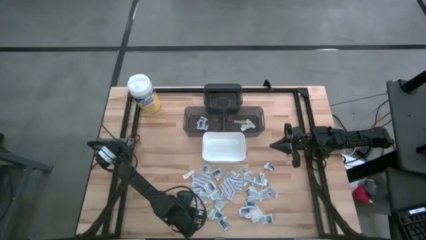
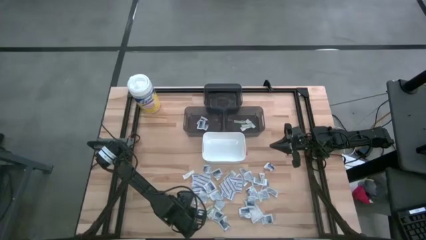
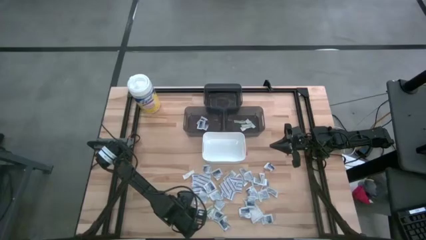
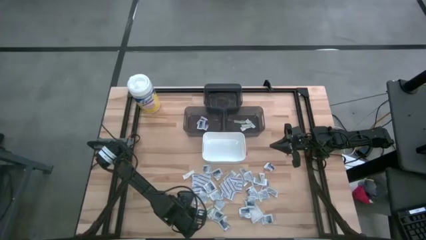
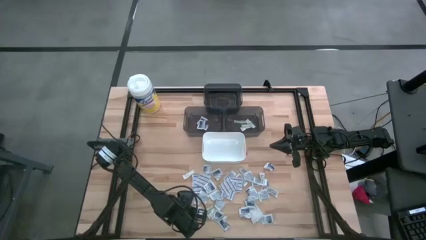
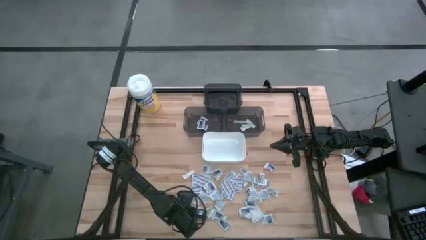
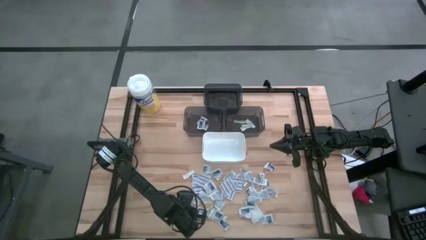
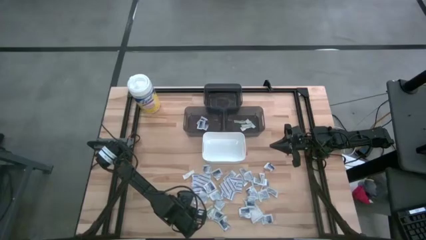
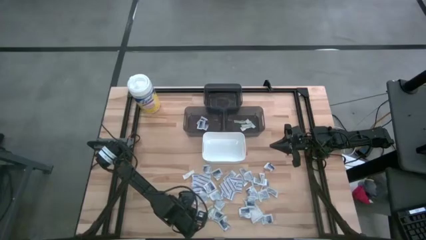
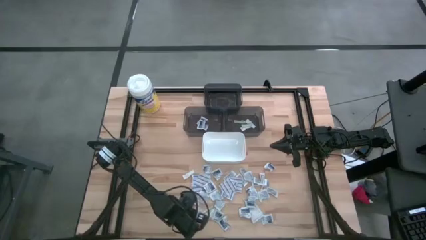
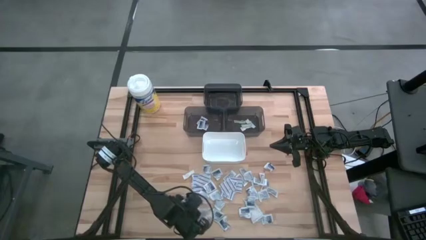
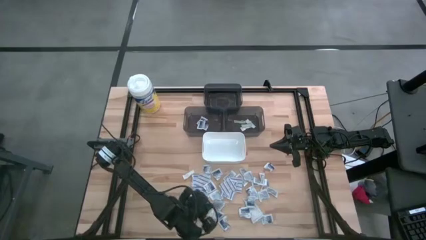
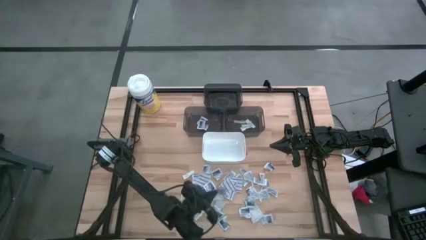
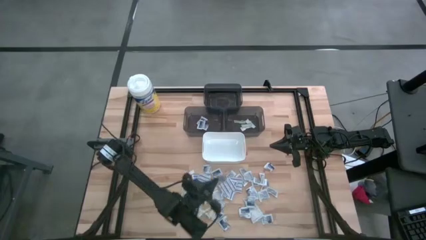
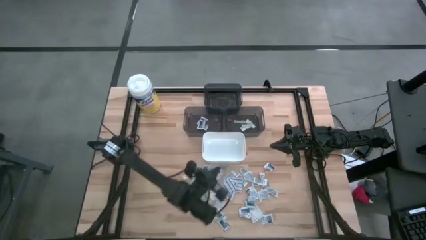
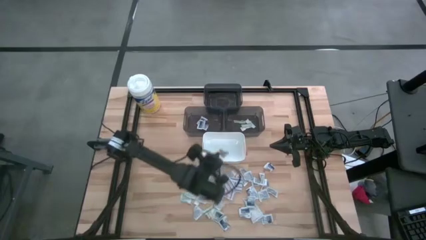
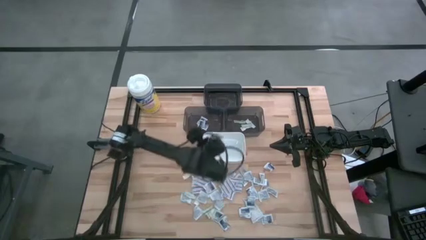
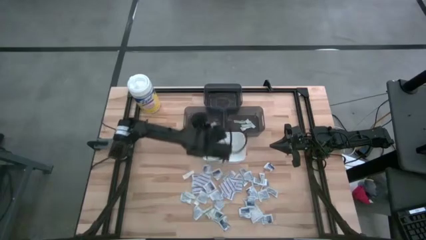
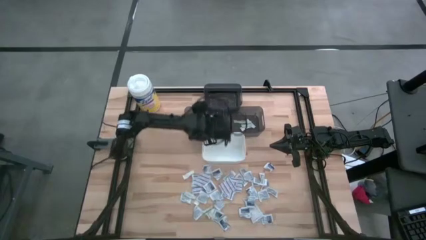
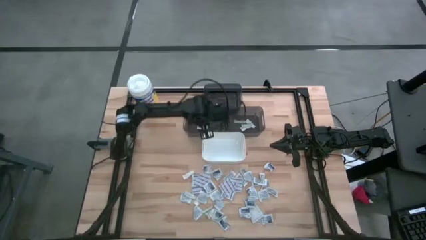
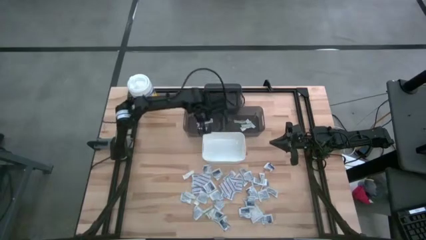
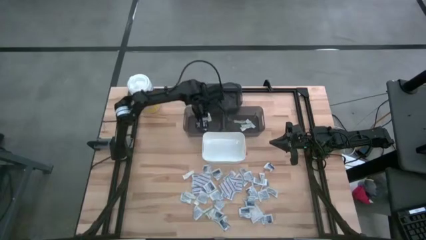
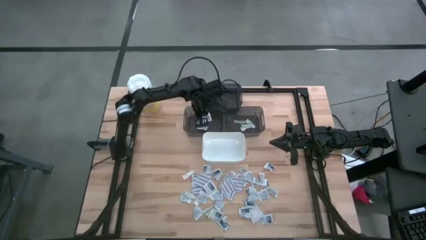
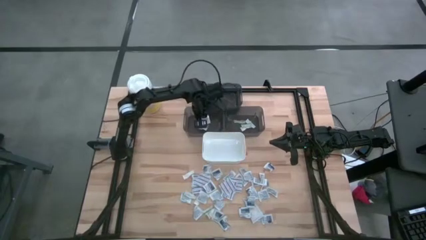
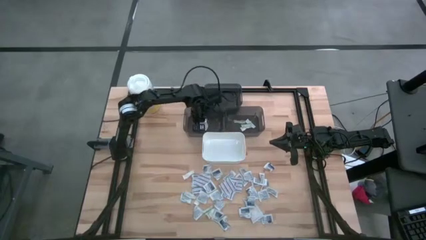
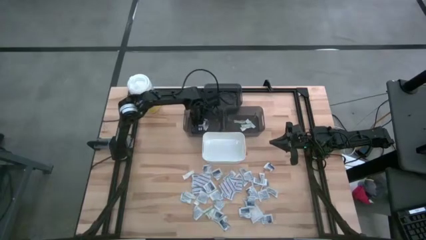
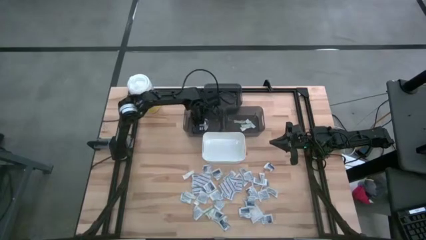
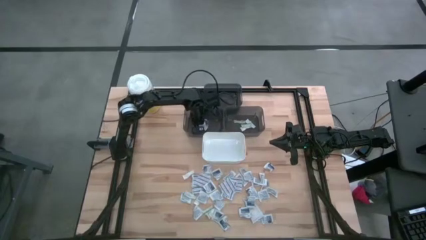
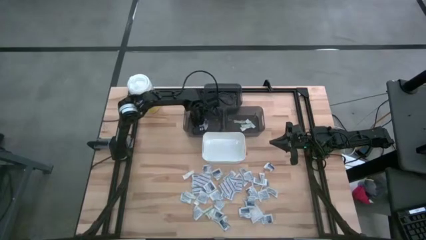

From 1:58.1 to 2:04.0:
Task: Pick & Place First Aid Supplies
Put the alcohol pad into the bottom left black bin

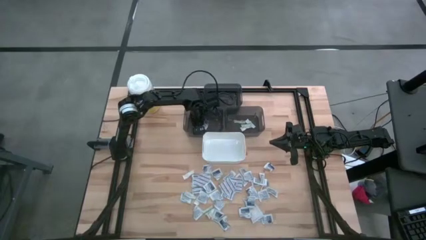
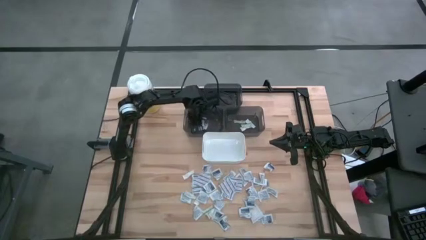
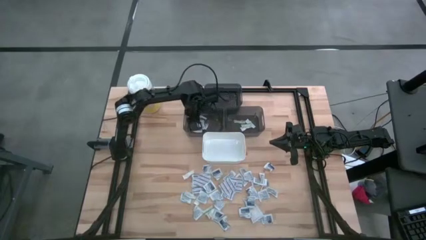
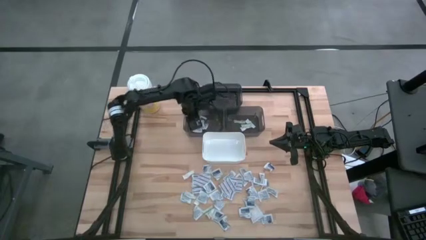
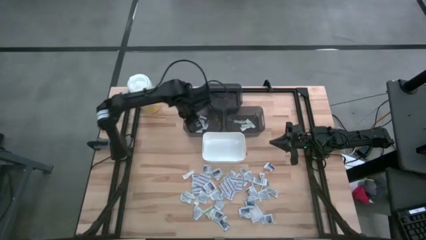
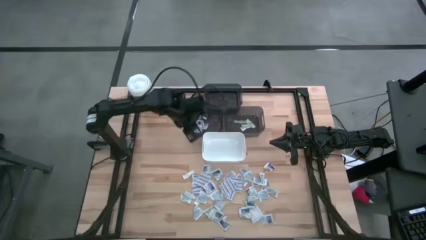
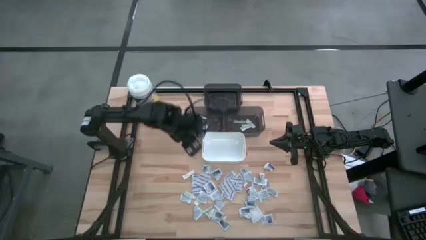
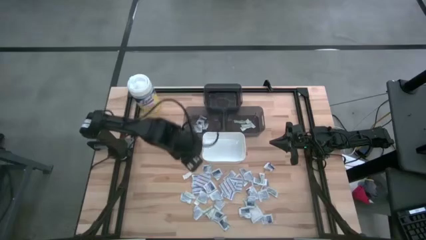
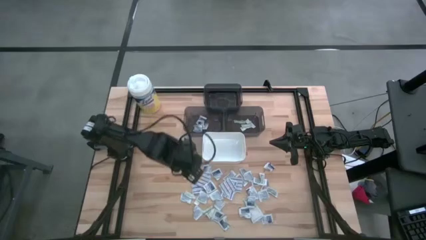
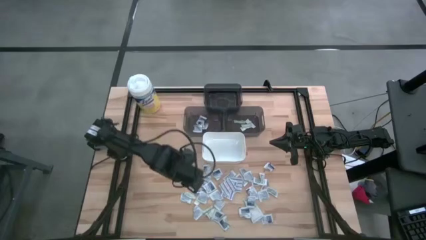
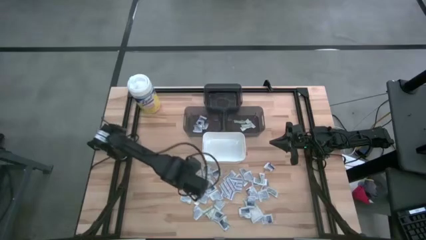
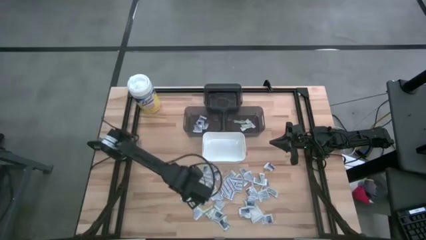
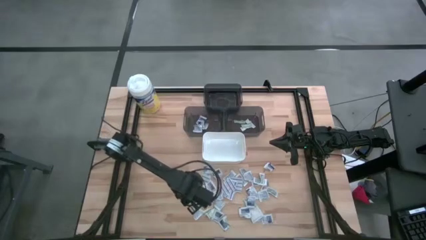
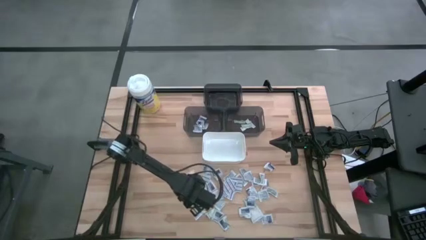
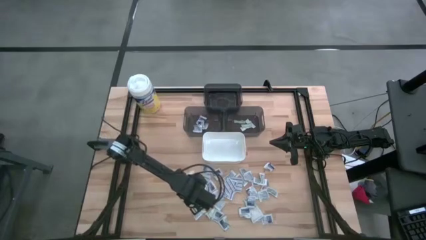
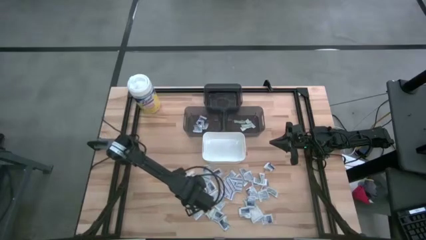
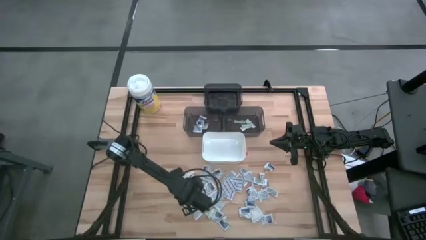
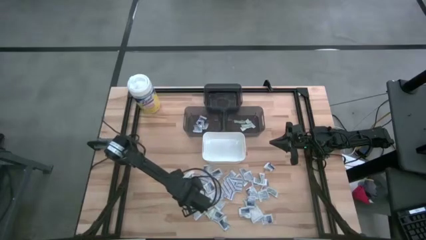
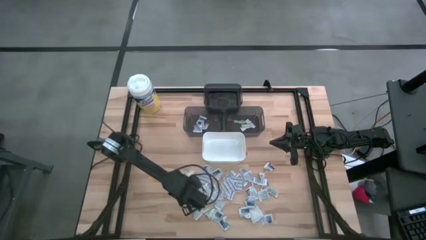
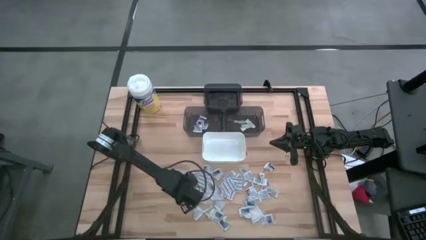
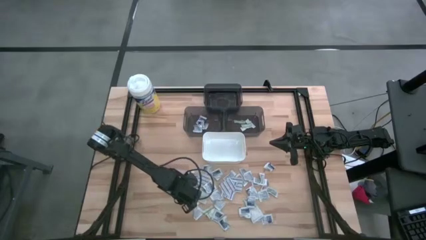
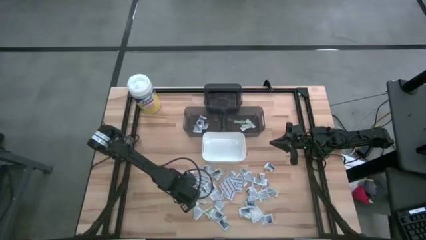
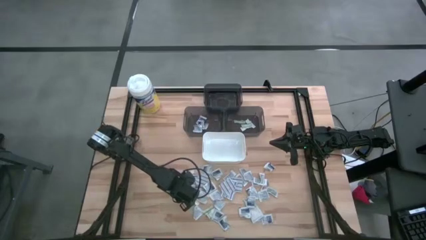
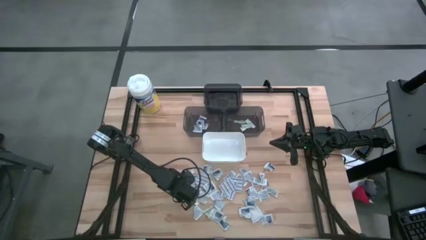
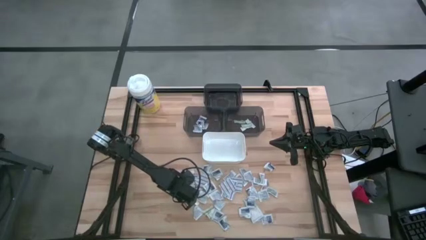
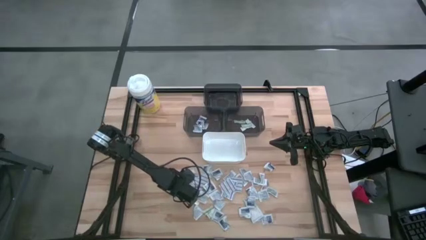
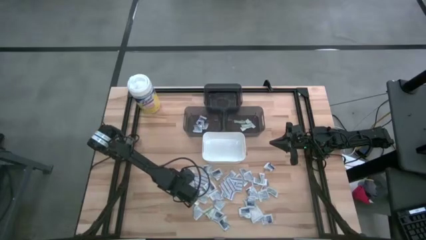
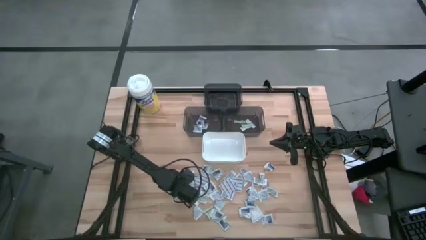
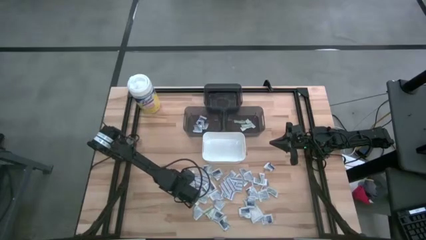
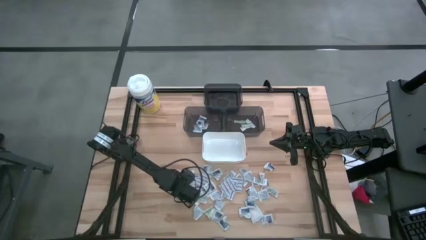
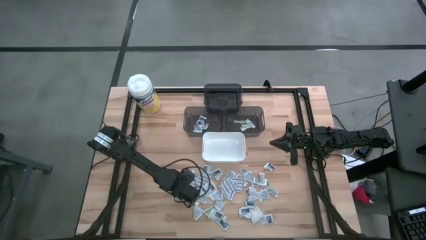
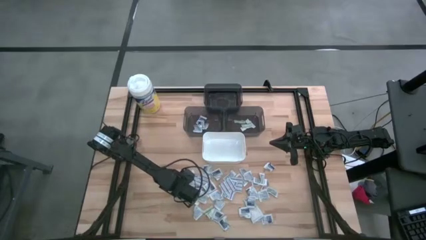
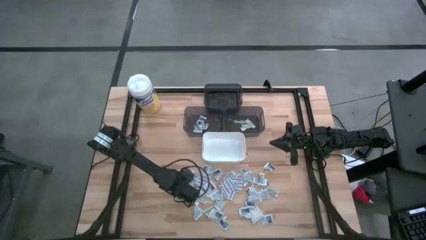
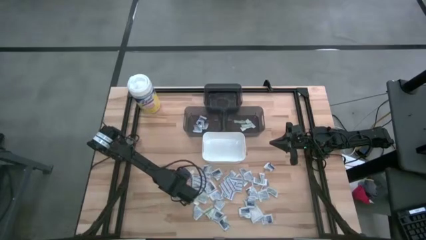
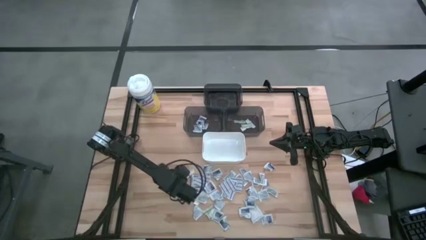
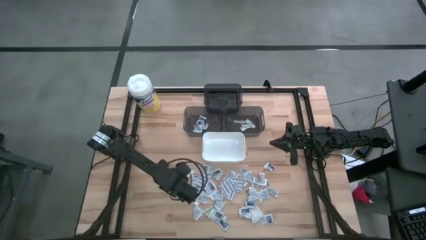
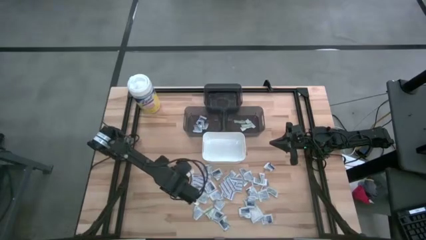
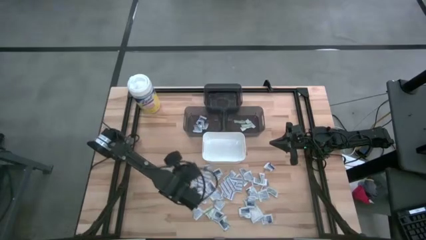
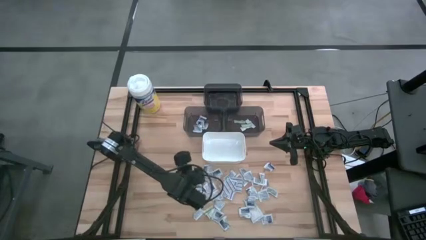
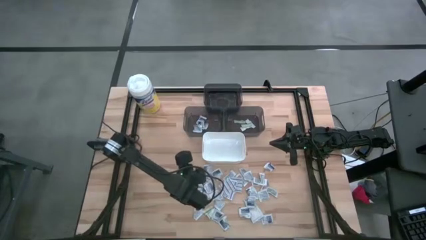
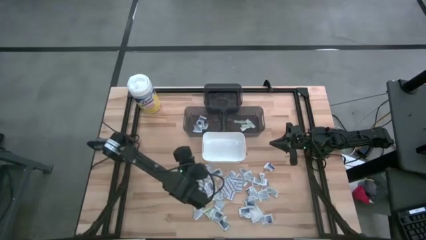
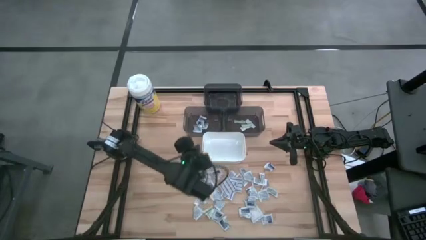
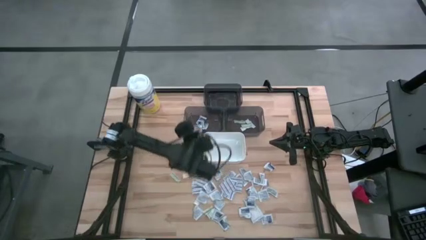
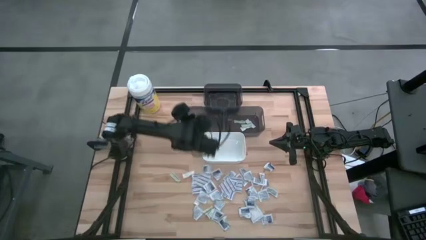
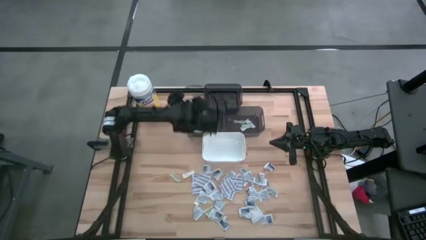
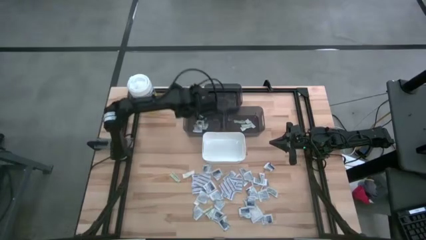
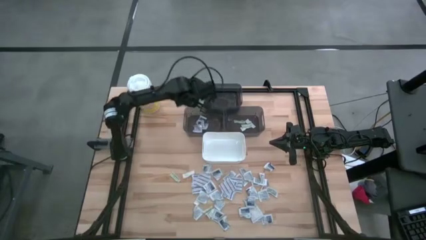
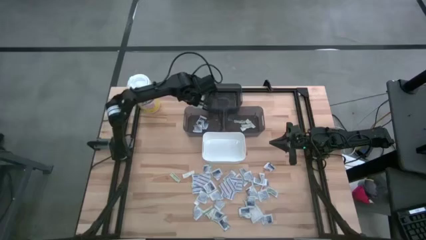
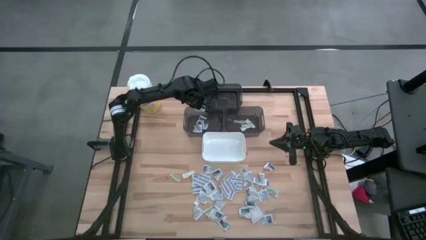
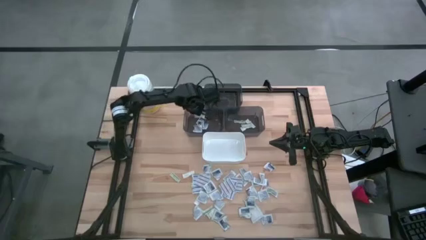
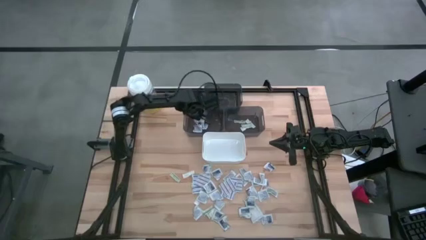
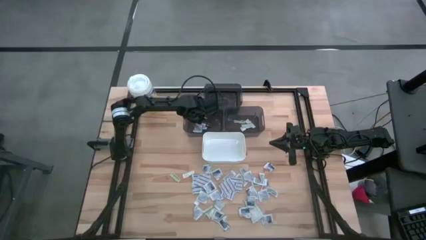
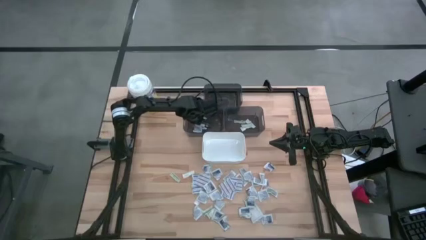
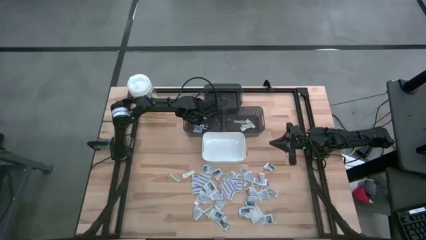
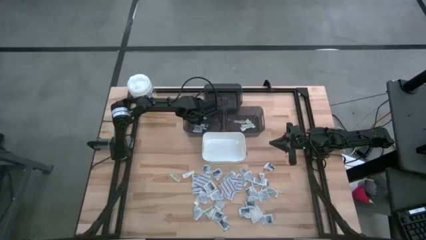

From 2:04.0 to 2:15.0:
Put the alcohol pad into the bottom left black bin
